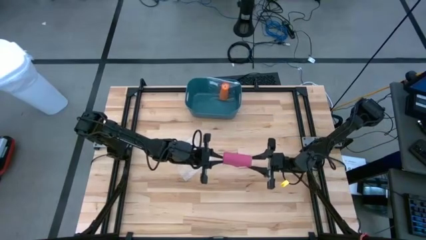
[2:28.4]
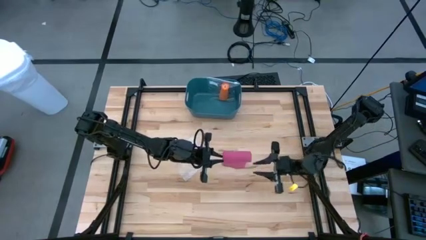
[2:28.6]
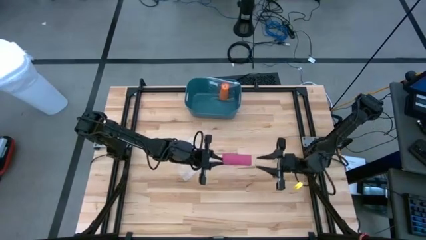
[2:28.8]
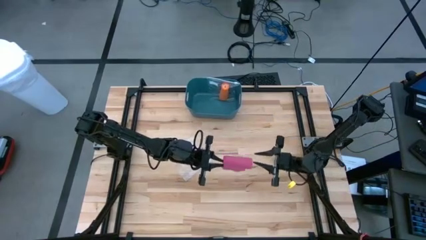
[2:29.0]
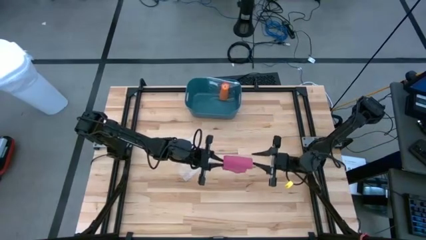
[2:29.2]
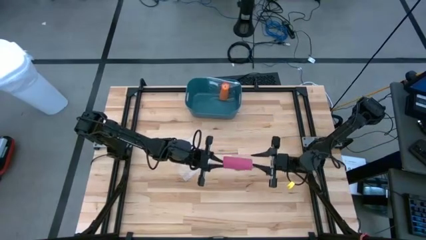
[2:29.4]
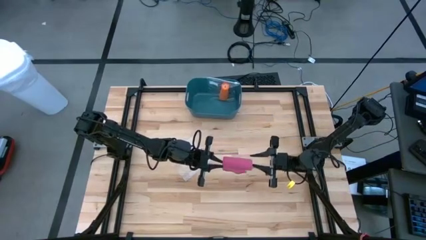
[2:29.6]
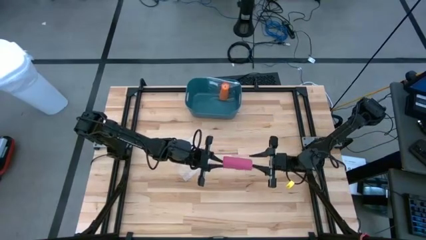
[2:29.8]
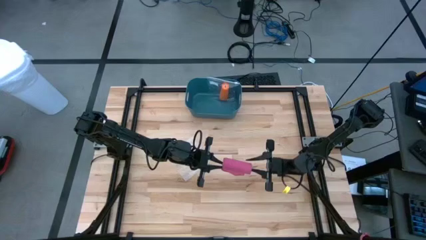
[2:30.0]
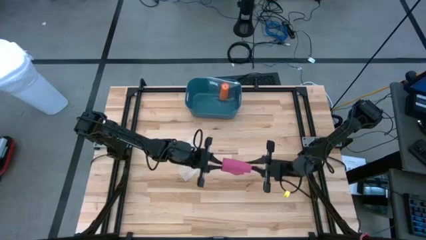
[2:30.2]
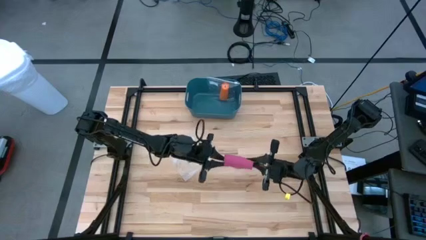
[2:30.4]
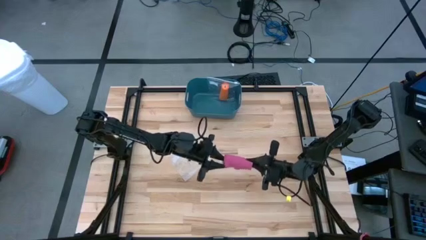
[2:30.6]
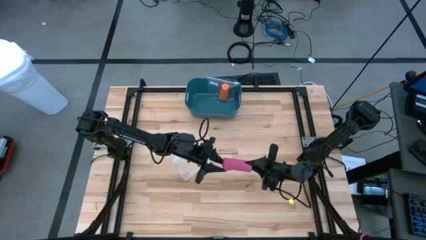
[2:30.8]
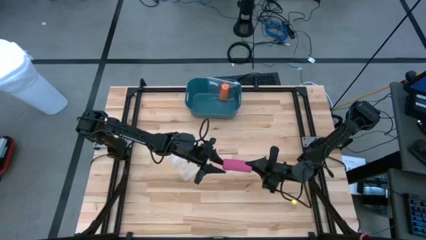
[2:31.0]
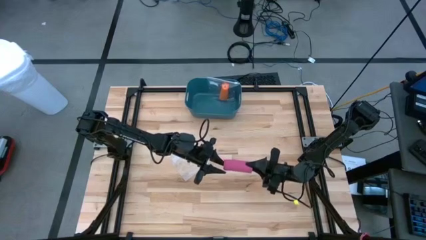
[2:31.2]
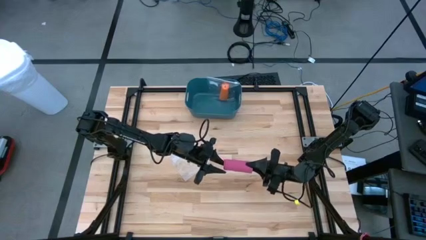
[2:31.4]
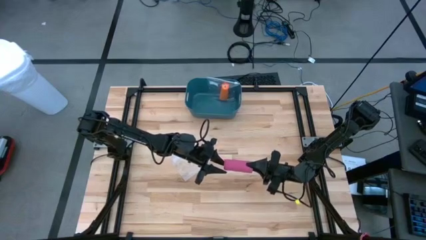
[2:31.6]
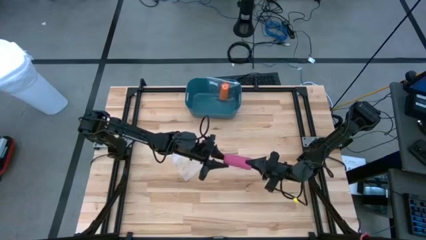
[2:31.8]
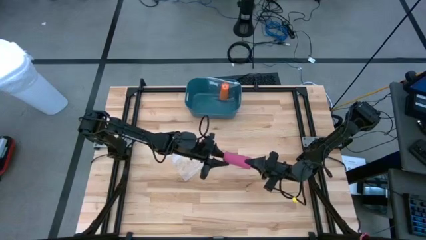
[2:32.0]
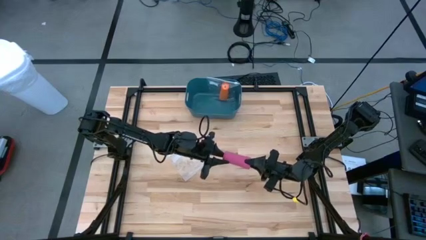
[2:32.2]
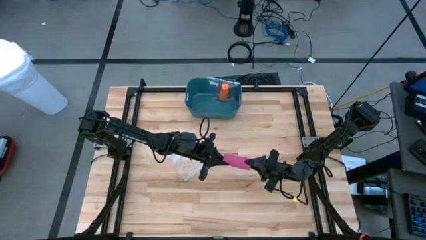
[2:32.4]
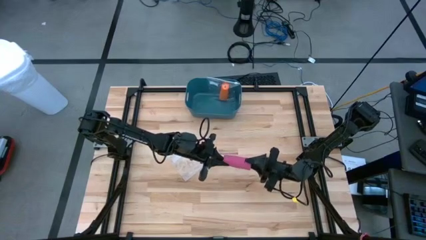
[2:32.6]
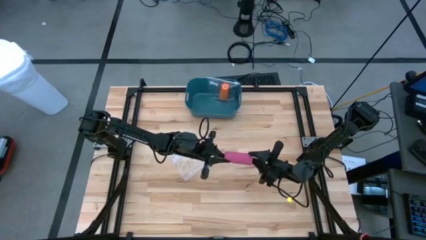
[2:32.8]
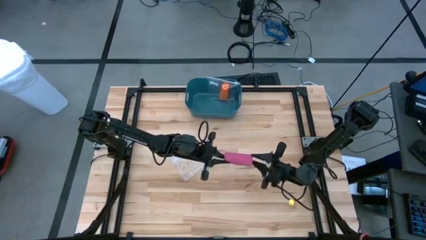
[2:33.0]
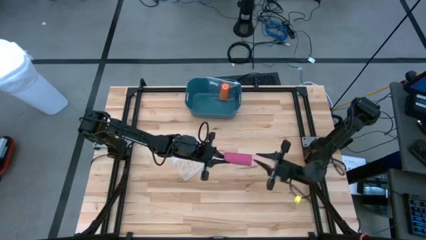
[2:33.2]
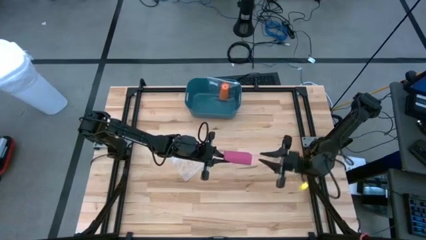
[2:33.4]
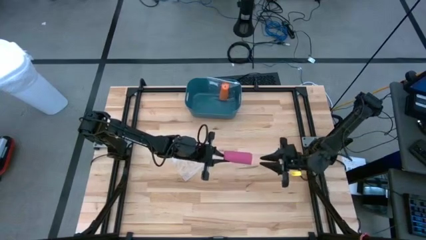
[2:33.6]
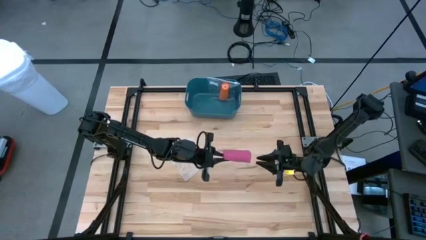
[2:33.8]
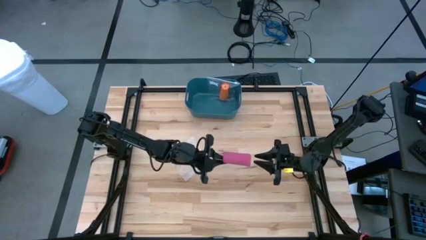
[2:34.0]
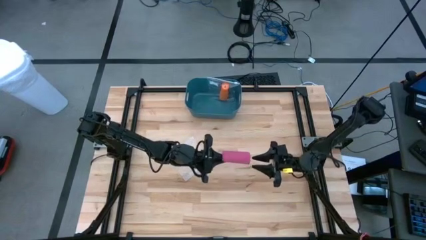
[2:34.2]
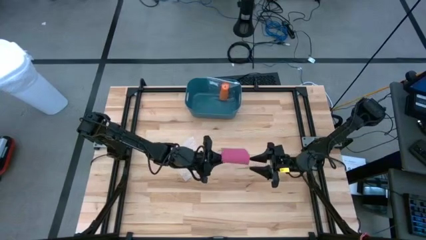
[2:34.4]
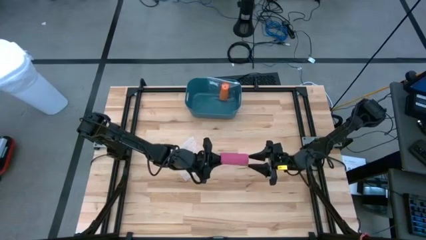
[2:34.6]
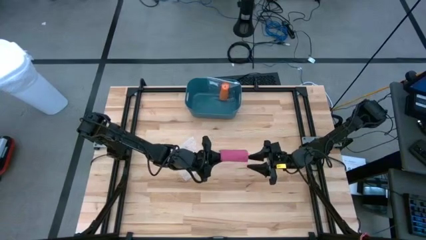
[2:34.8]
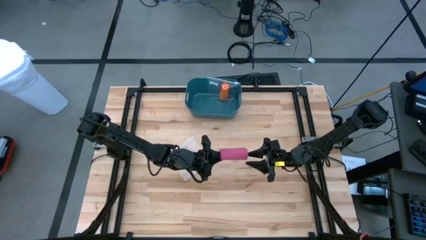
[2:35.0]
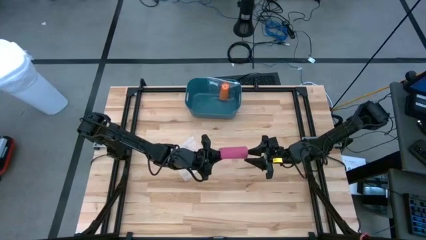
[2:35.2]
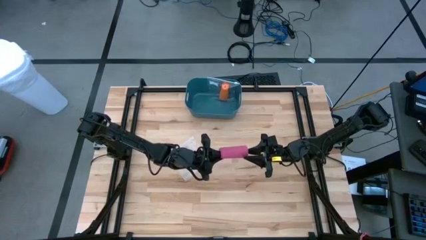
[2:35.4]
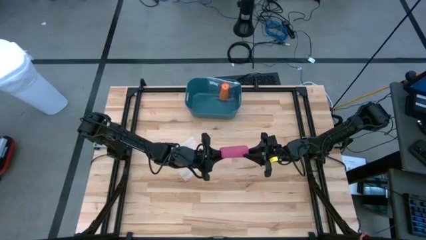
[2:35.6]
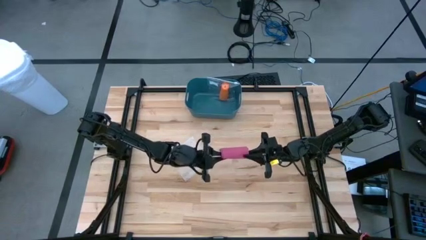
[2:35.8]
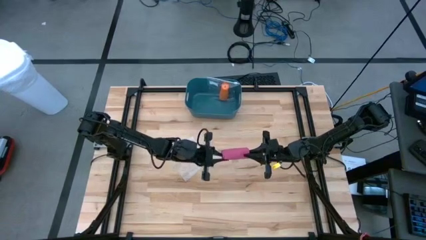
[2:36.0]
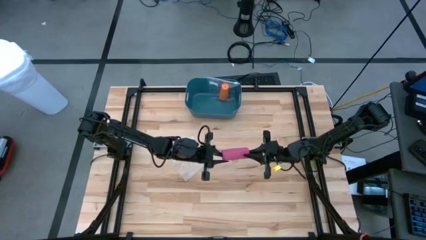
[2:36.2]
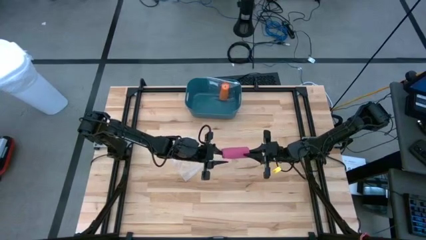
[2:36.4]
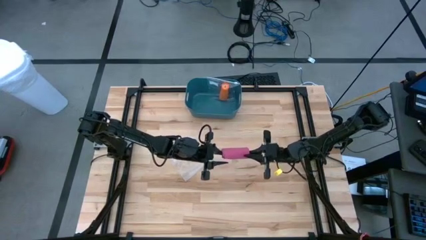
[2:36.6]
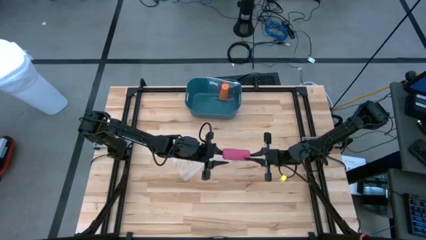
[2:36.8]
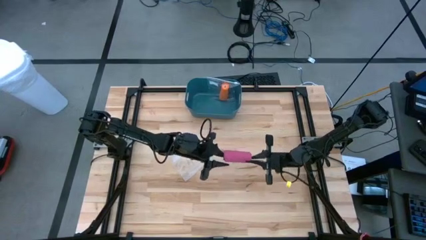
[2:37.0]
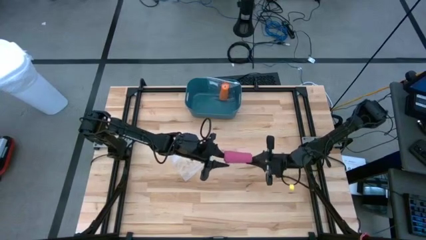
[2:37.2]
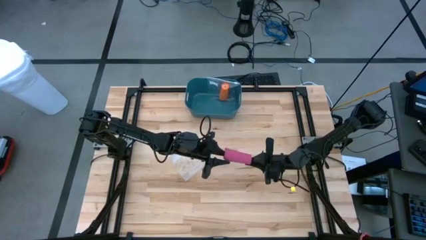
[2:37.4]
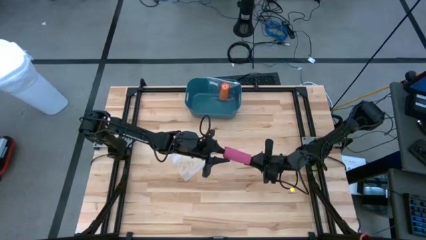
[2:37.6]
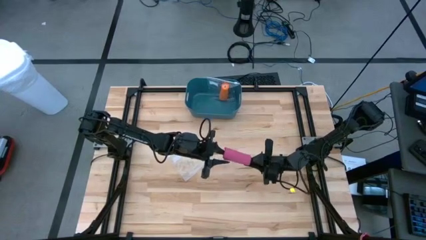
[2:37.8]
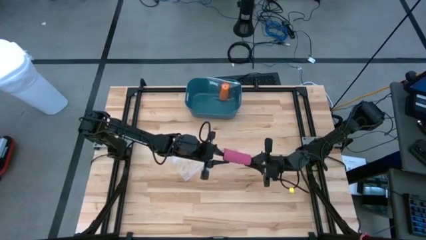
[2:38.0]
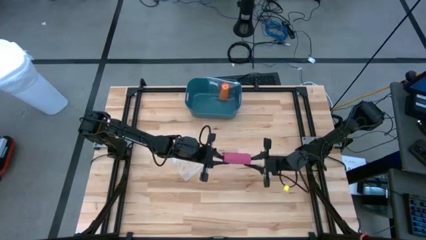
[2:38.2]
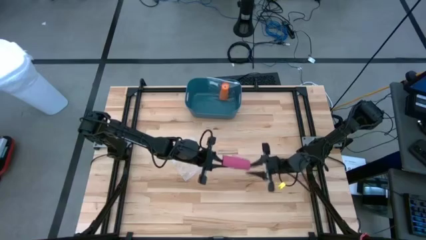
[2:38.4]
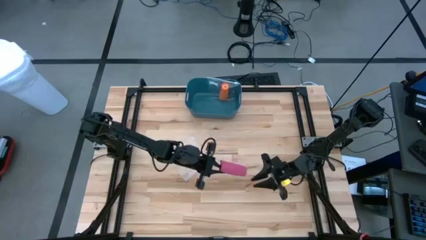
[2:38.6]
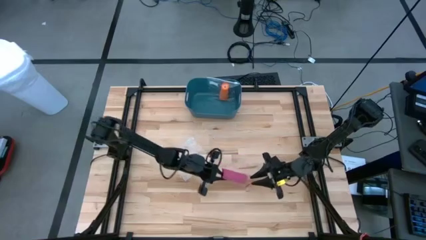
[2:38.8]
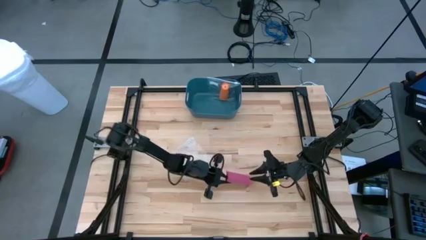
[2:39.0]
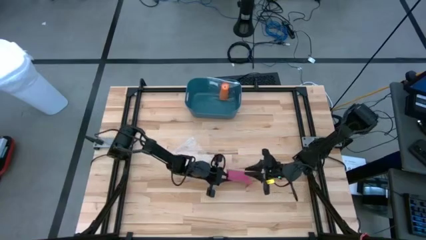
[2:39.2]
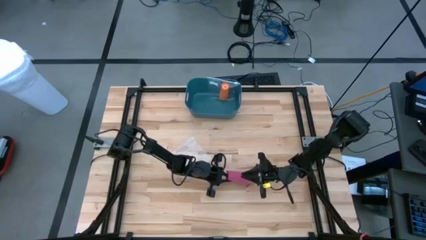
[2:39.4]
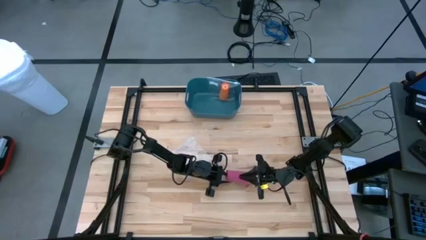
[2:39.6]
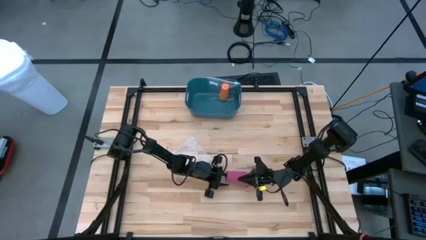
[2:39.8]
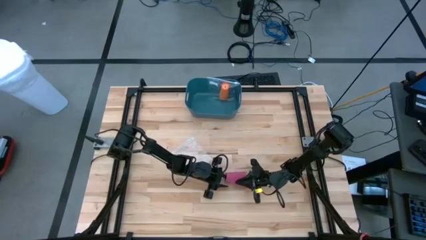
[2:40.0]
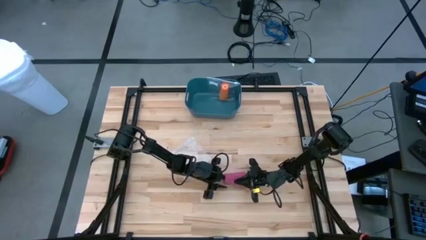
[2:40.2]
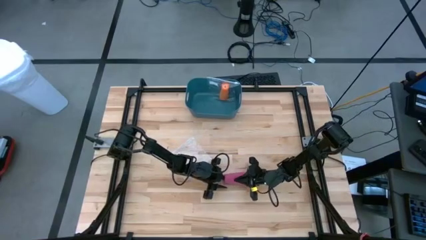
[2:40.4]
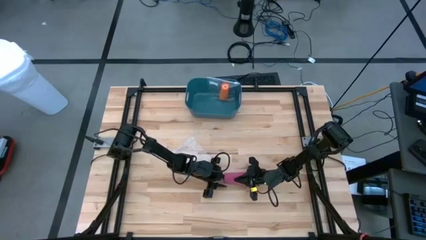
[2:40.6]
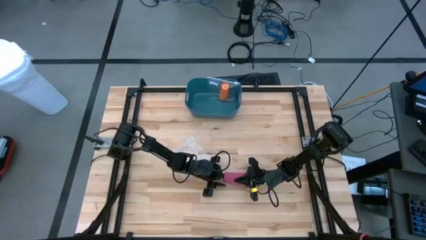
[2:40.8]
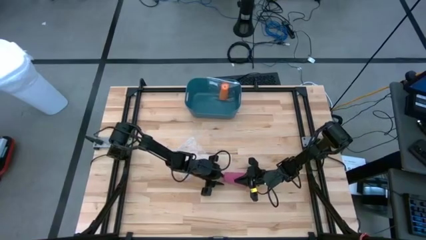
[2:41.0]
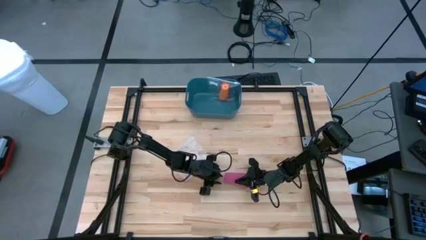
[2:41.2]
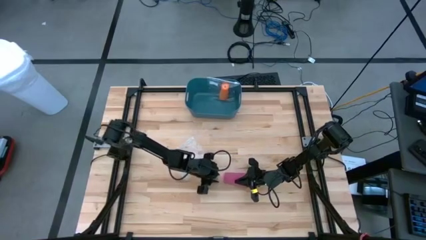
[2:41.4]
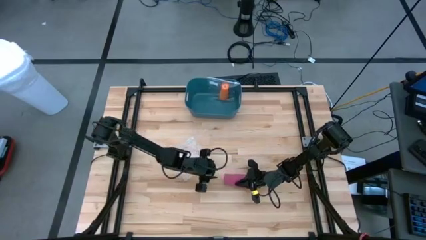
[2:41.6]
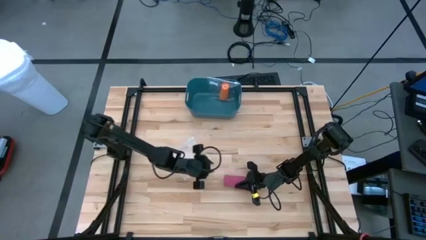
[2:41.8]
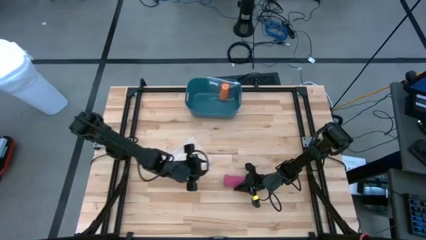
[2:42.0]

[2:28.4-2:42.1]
Task: Roll bandage
Roll the pink bandage
